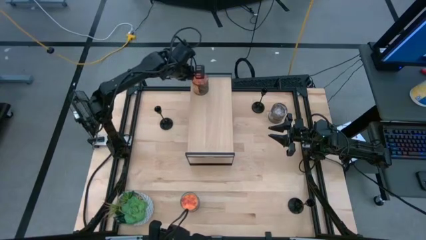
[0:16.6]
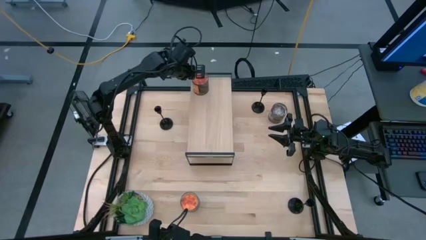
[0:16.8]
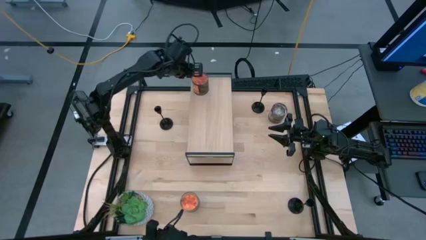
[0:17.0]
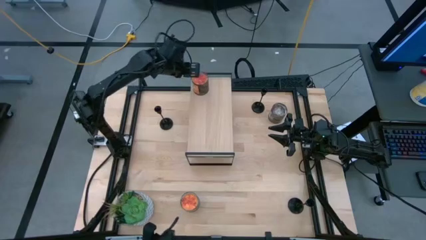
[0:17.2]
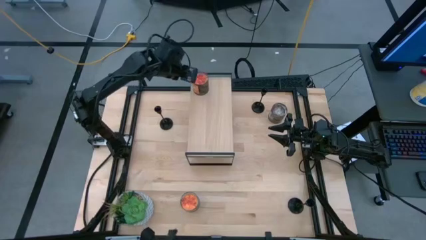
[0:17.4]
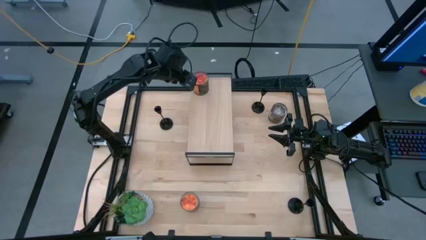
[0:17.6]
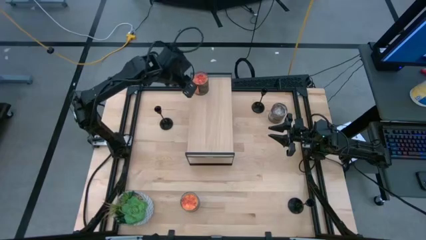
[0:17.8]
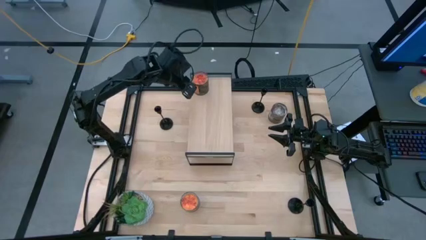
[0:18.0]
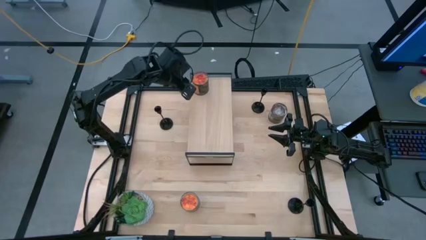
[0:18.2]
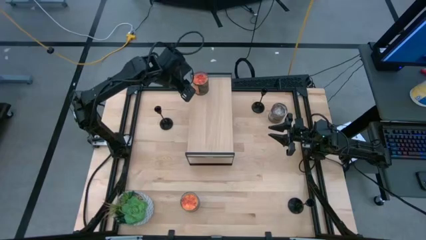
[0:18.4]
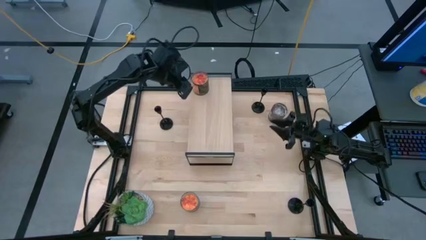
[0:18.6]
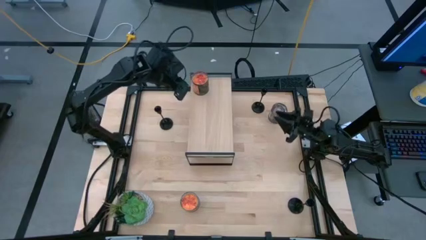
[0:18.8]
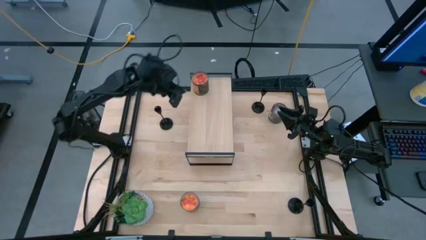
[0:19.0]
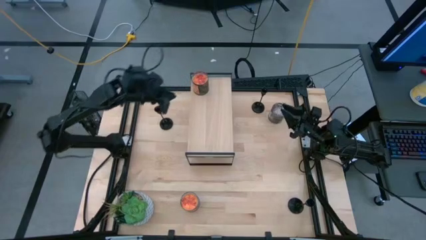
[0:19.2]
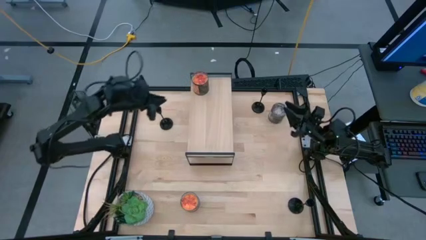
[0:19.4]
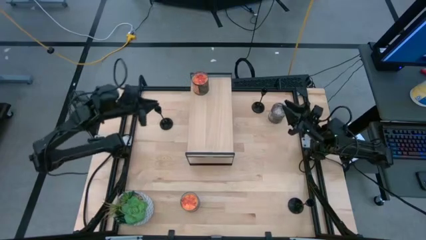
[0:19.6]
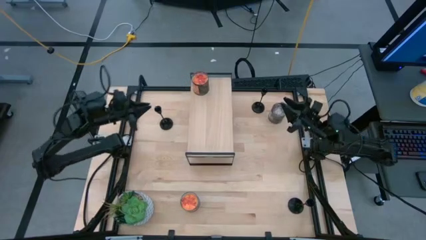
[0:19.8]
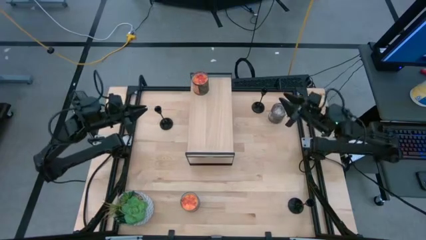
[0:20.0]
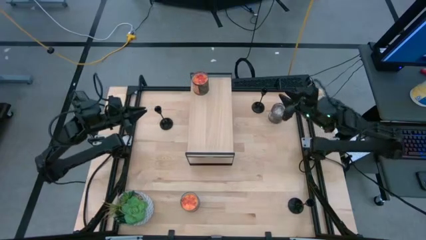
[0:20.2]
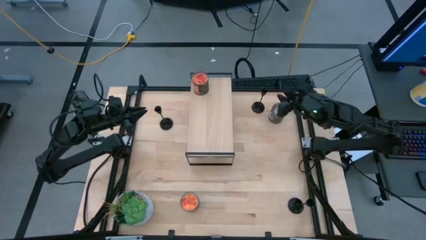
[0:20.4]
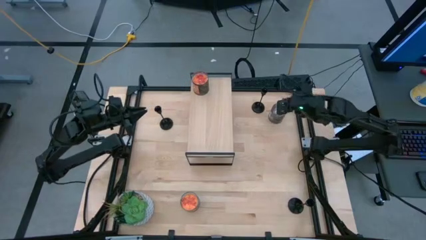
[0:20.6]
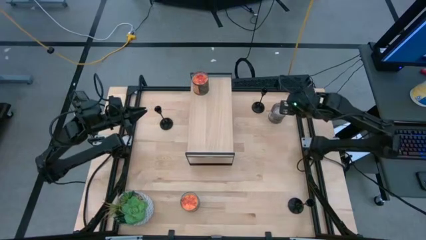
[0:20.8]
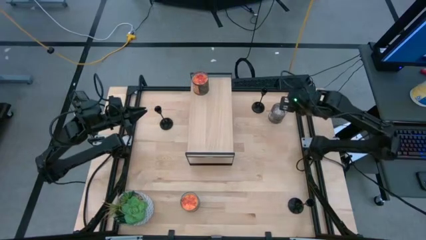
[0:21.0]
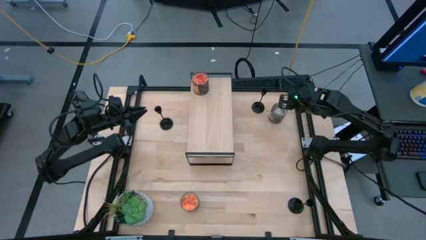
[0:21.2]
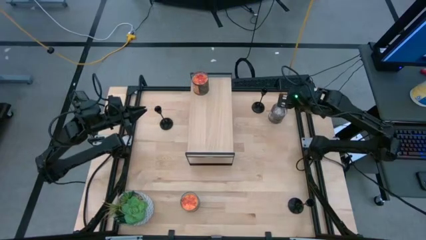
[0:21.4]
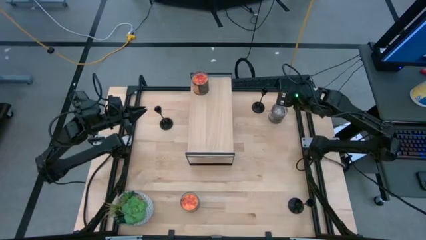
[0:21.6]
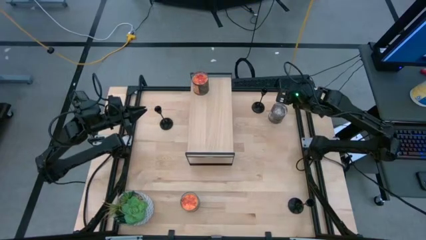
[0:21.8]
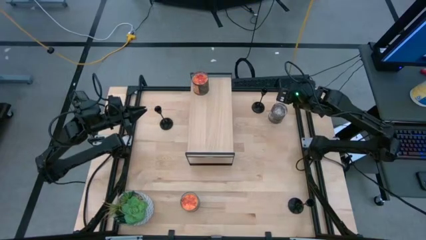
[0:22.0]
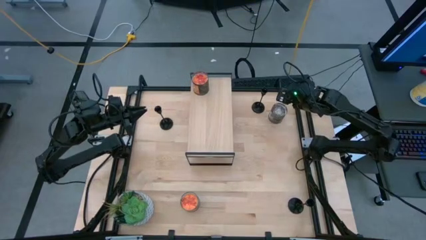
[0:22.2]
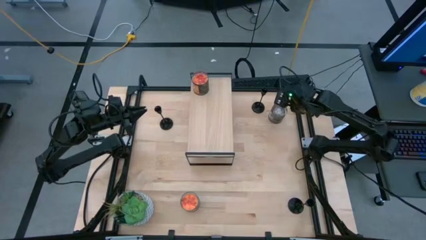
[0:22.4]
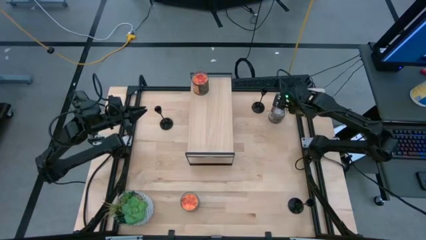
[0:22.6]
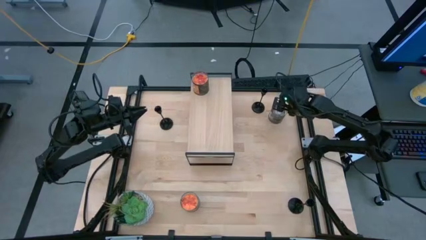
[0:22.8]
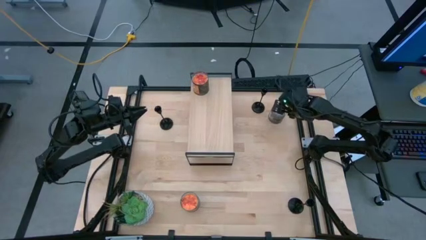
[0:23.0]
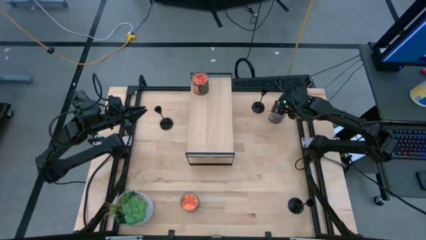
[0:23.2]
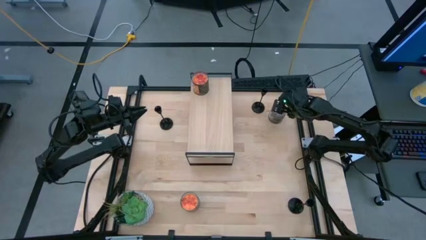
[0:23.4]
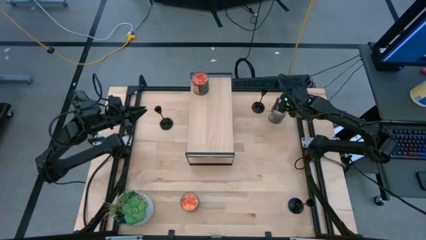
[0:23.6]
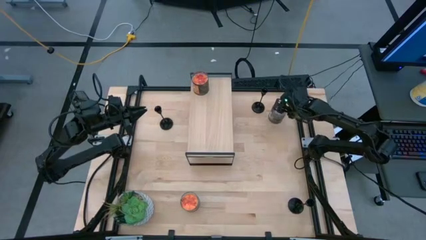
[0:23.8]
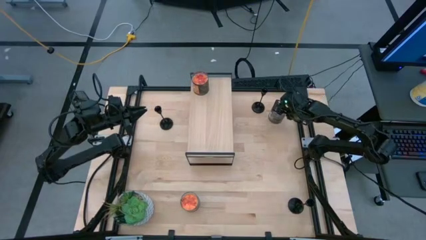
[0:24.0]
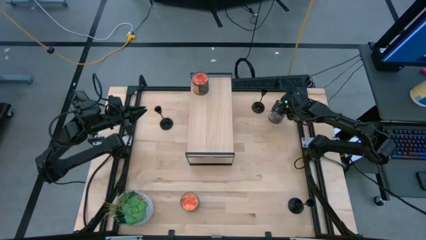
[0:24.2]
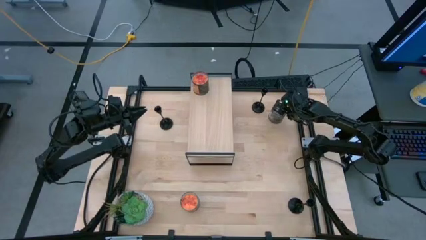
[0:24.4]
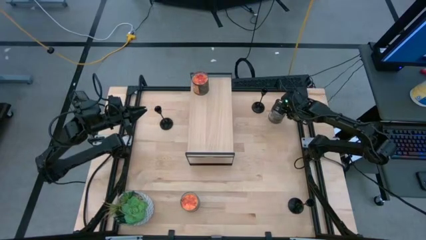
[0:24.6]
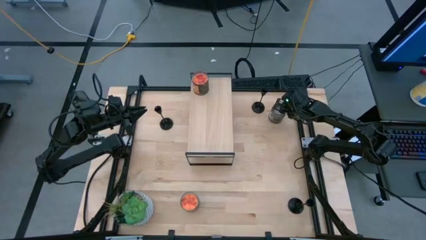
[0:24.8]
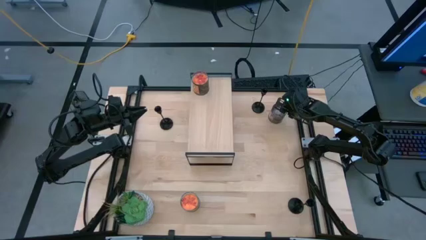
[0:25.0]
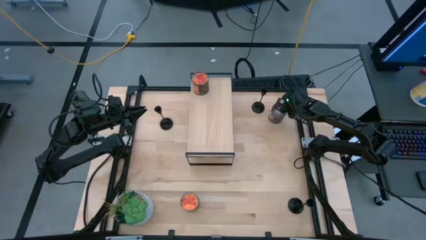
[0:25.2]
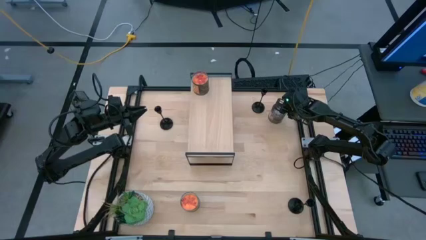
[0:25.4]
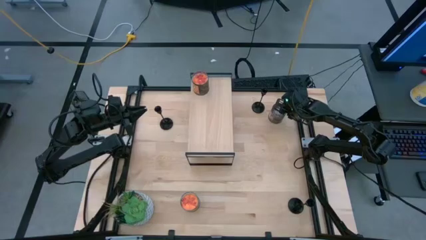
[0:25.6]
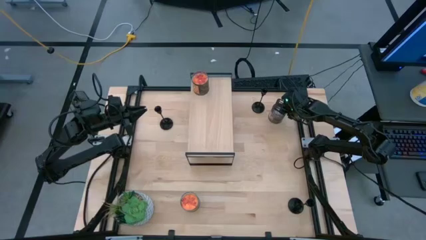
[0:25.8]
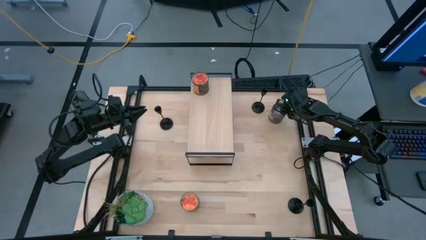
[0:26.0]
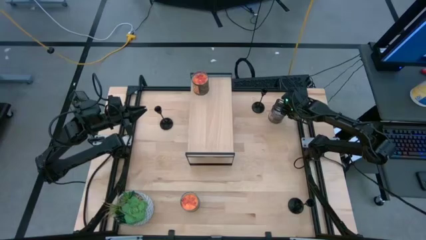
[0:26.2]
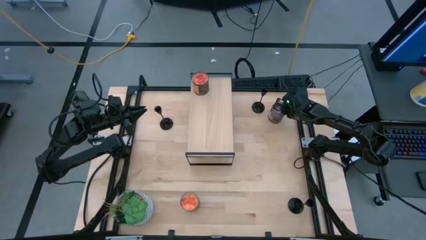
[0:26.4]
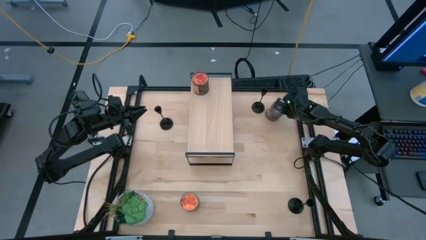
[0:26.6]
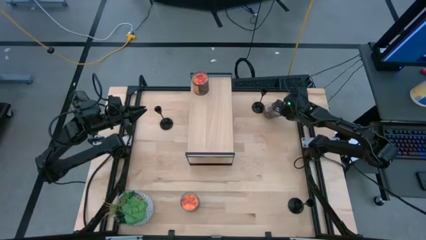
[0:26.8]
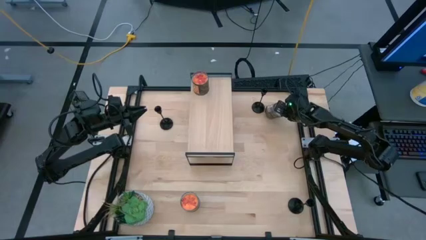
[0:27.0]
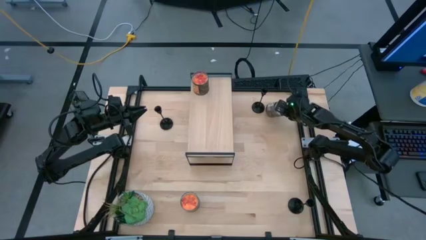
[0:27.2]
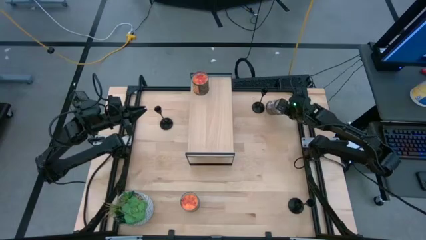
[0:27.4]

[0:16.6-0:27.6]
Task: Pick & Place candle stick holders
Align the brown scented candle with the orange scented candle on the shelf

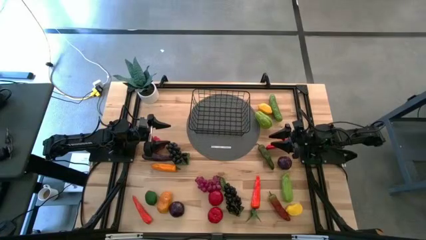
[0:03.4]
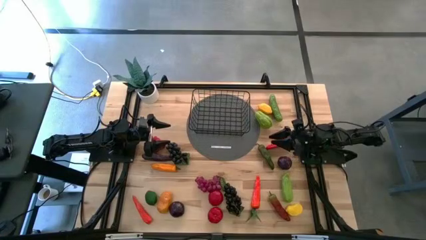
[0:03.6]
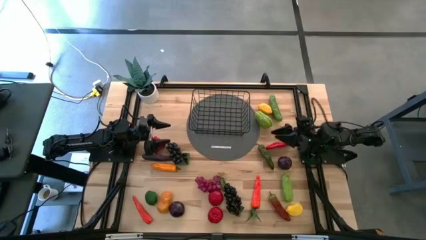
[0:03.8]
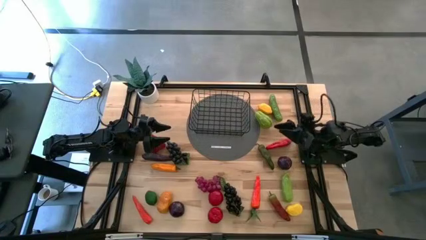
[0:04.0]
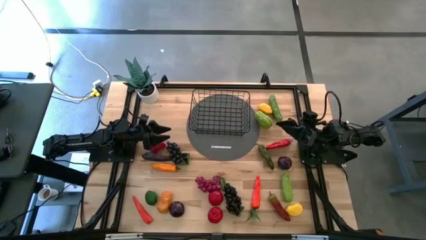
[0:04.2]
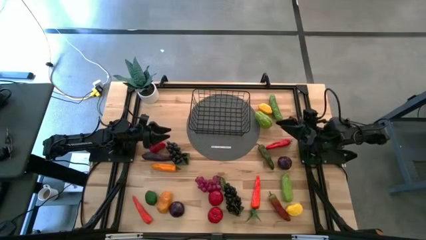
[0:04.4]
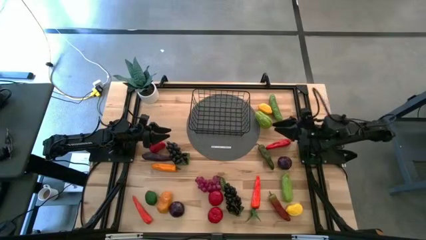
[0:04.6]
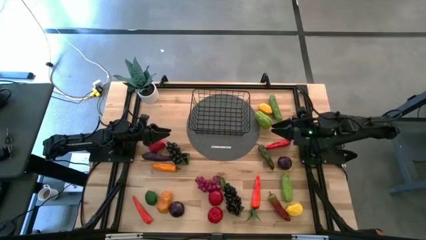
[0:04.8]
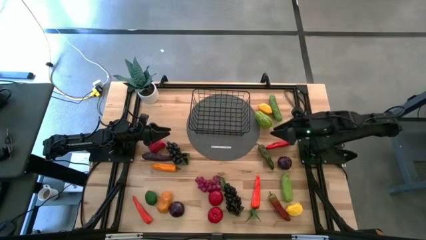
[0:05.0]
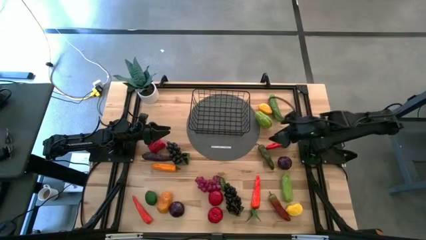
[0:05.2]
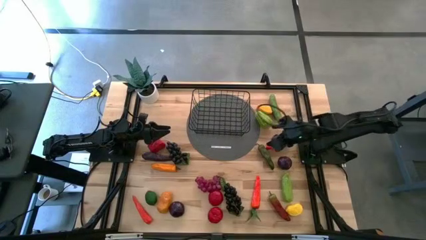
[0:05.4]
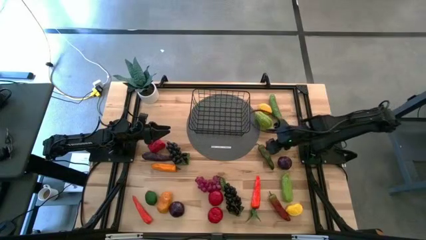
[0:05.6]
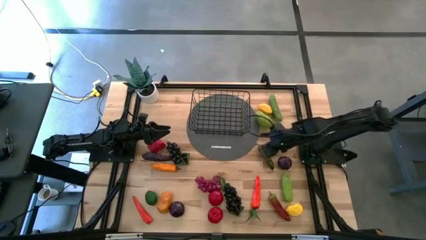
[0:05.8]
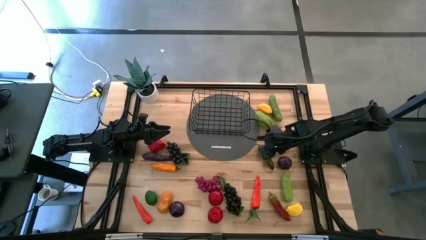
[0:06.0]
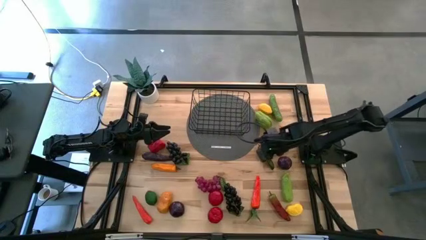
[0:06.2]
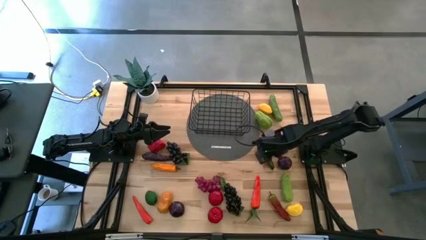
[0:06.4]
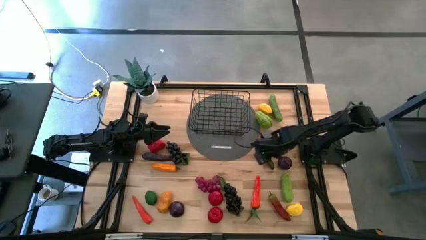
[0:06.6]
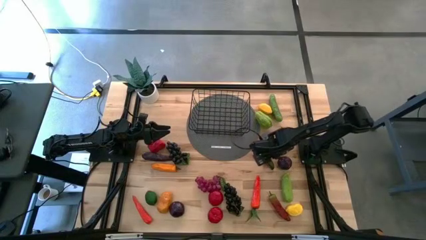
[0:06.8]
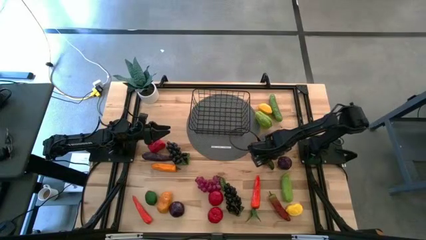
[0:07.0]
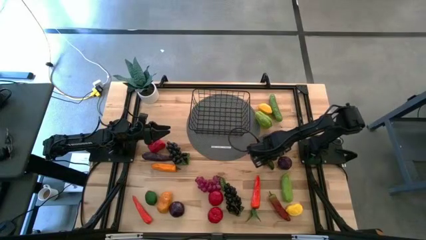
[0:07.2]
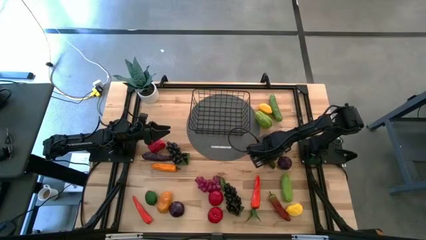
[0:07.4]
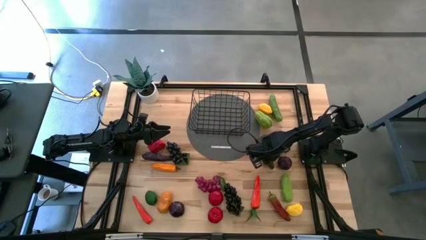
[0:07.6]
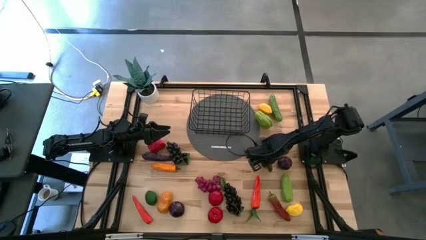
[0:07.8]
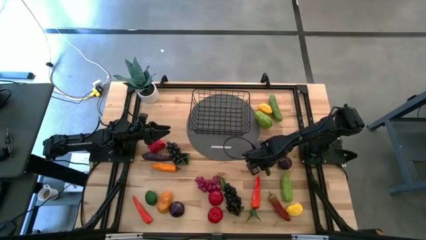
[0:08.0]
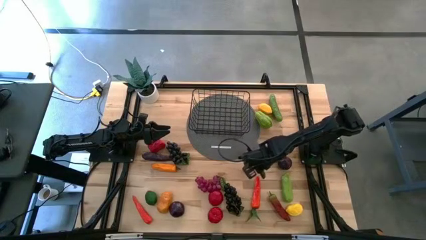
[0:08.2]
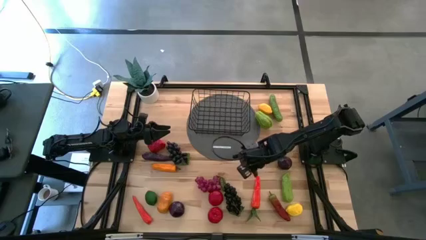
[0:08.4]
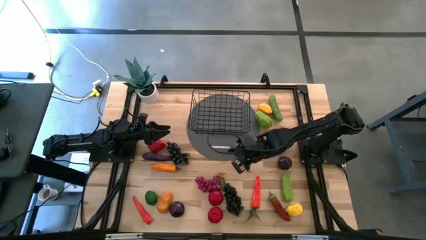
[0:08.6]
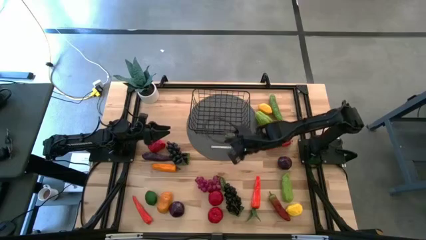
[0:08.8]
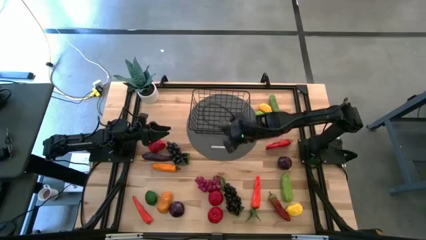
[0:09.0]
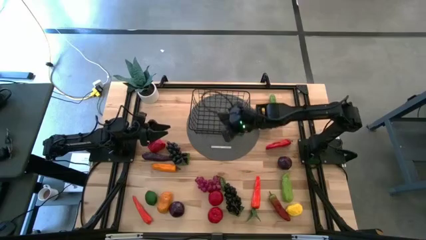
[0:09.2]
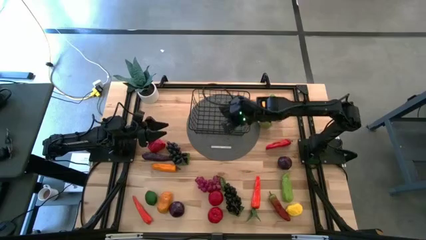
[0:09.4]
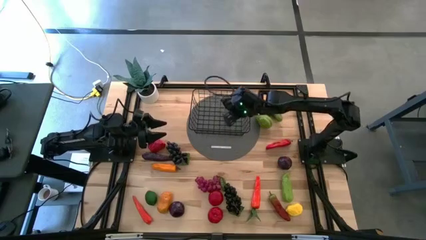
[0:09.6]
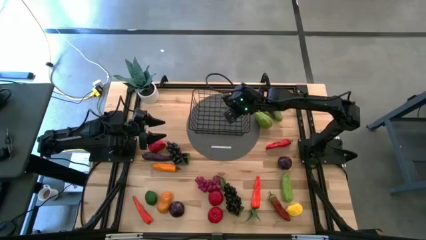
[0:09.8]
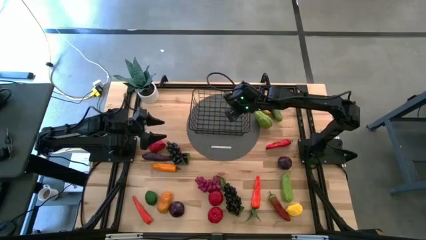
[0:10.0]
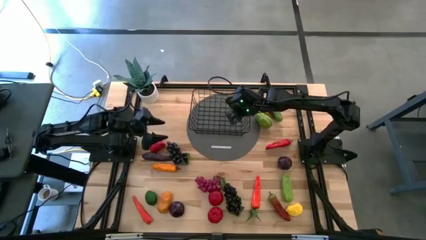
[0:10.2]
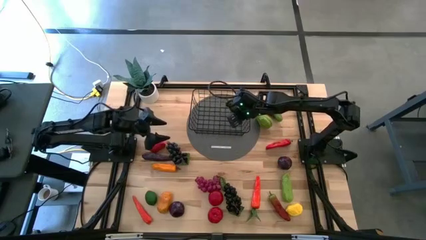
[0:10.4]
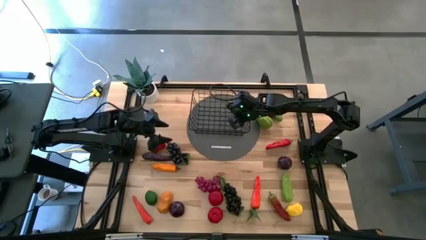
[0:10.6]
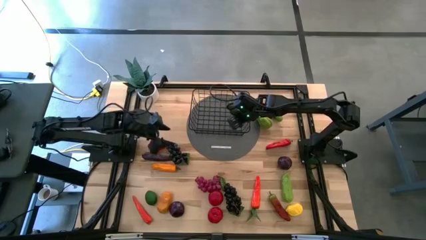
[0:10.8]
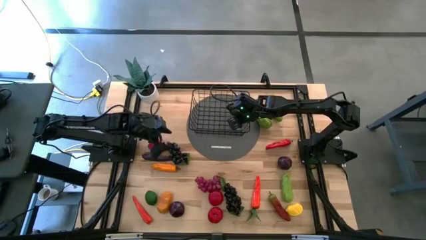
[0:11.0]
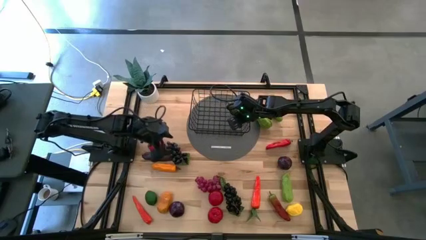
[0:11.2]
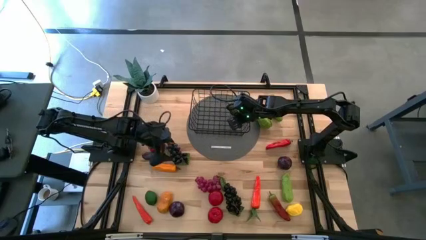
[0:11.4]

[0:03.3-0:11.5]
Task: Build produce basket
Put the green chili pepper into the wire basket
